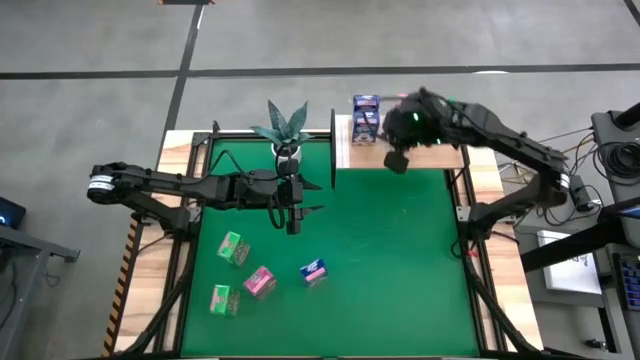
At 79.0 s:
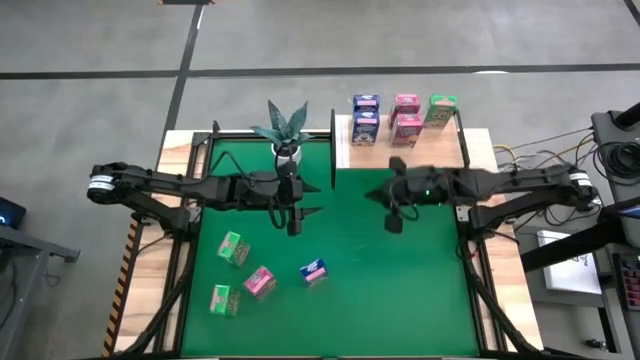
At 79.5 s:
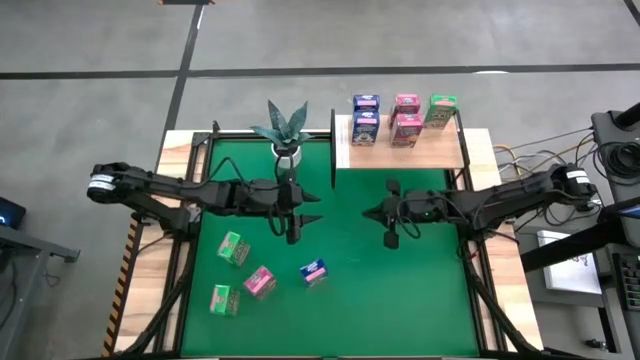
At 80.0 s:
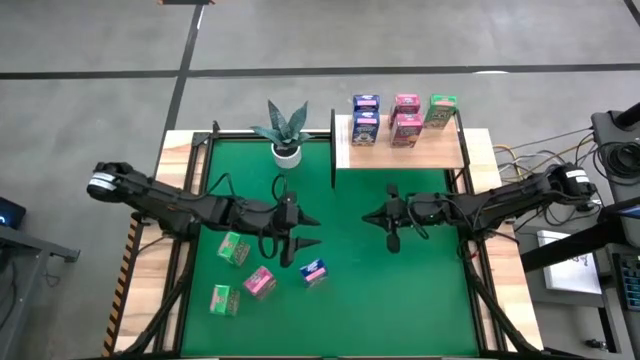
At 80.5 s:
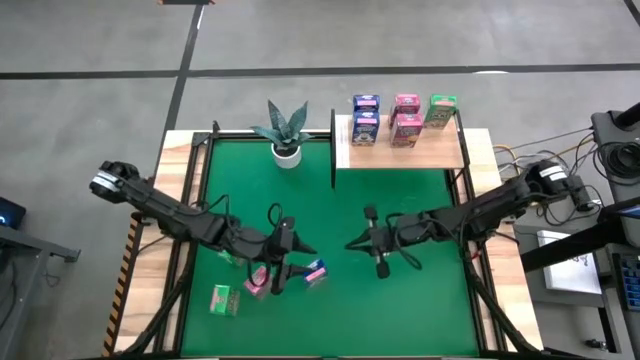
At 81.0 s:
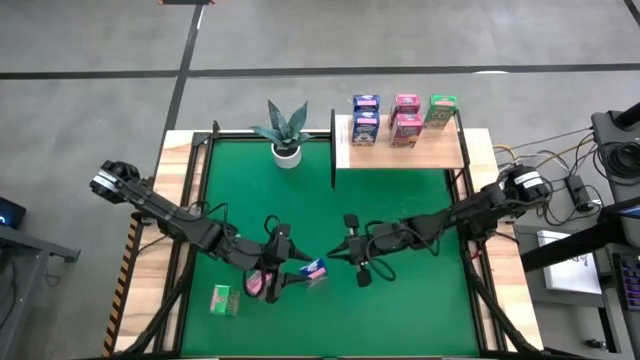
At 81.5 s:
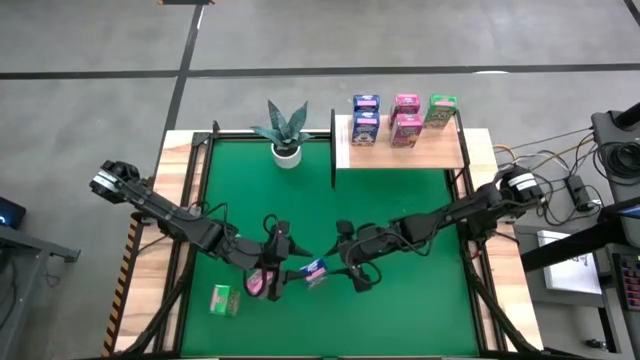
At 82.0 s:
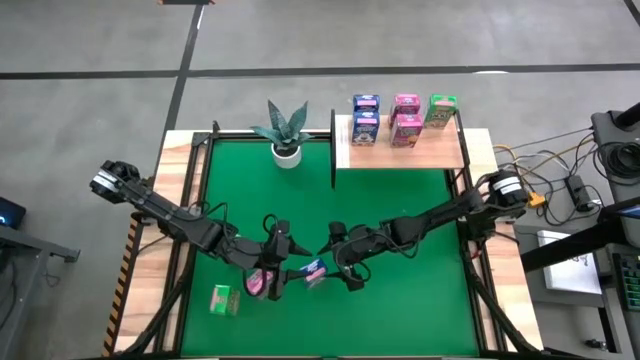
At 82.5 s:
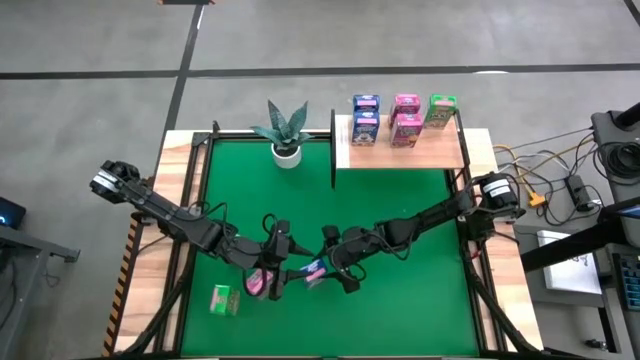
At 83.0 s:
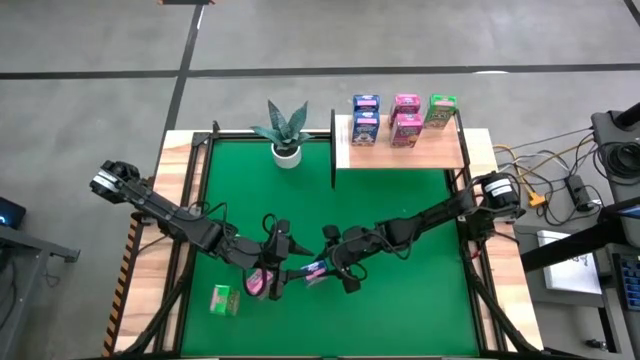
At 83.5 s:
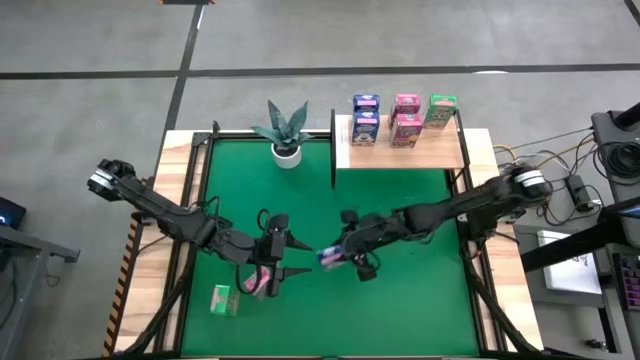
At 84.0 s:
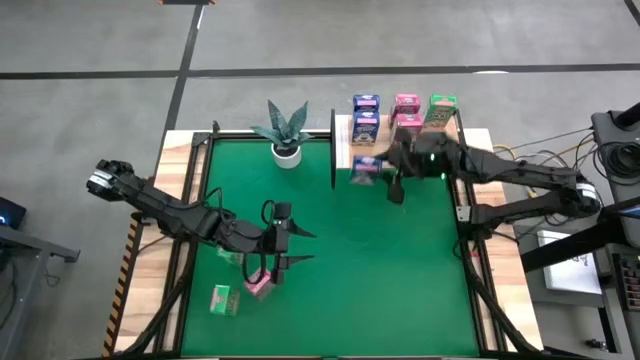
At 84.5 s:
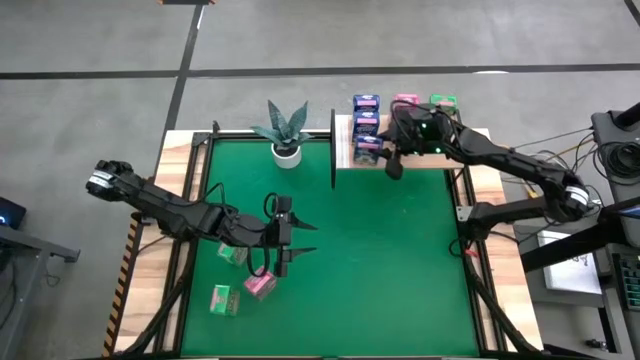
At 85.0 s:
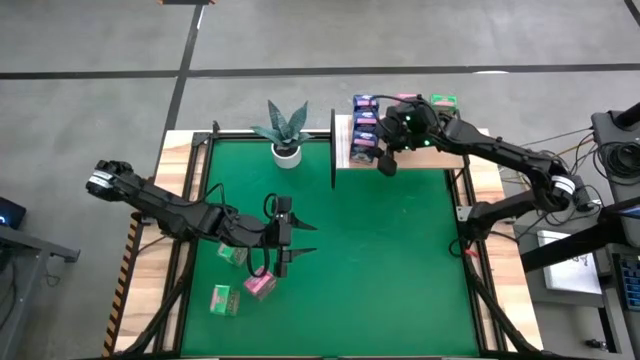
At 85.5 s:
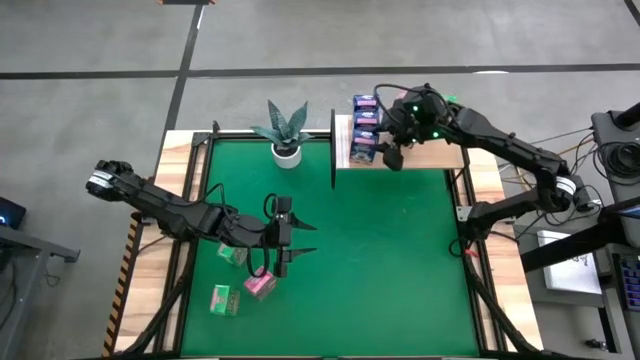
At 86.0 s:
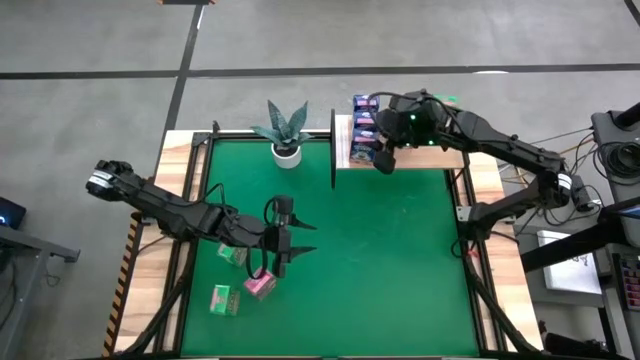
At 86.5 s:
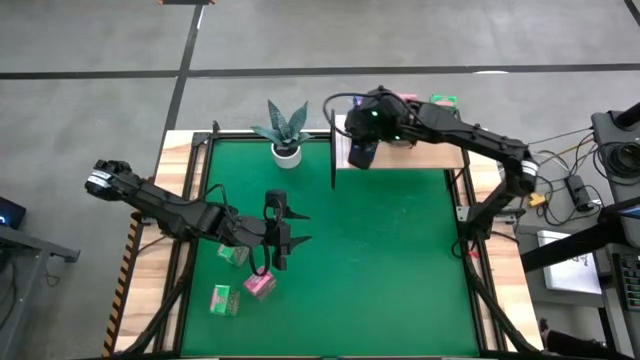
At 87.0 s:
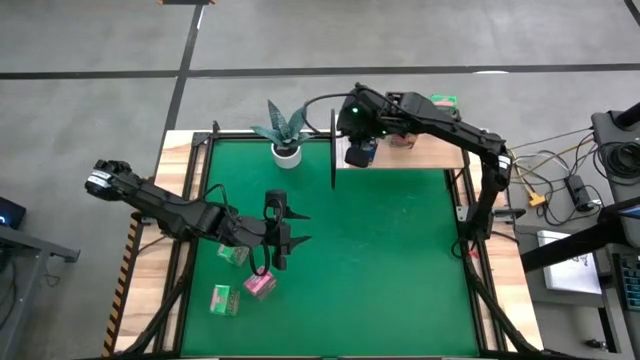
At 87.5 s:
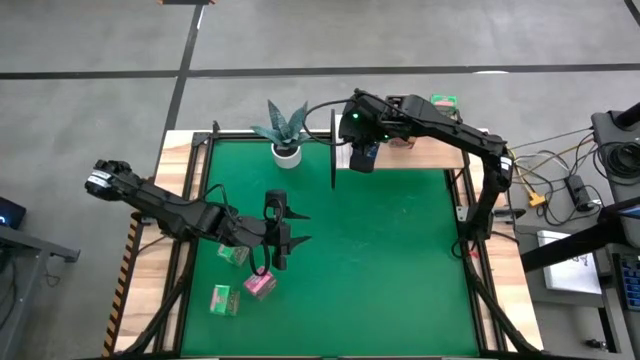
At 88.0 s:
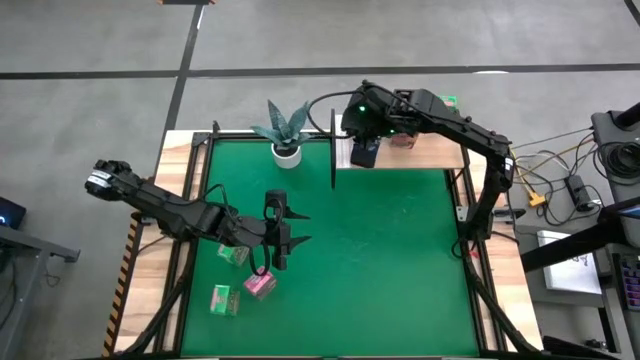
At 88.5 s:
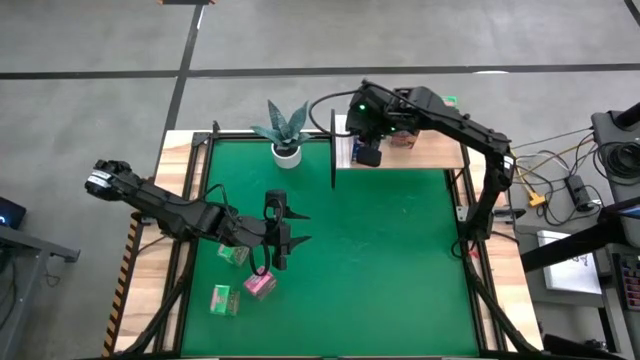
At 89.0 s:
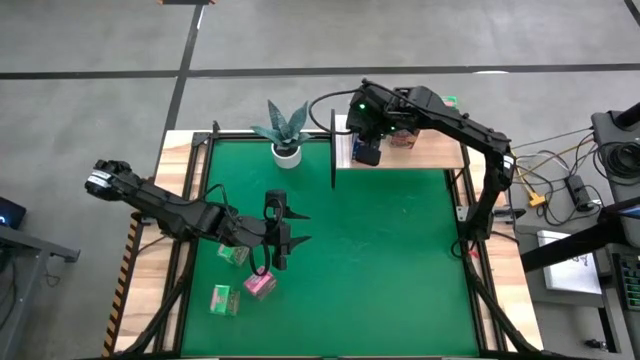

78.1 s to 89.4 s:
Task: Stack cereal on shelf
Put the blue cereal box on the shelf aligned with the other blue cereal boxes

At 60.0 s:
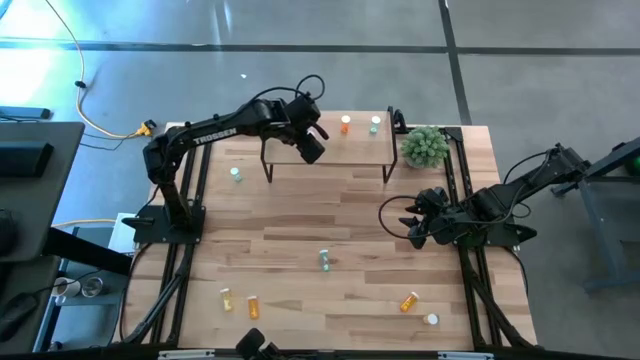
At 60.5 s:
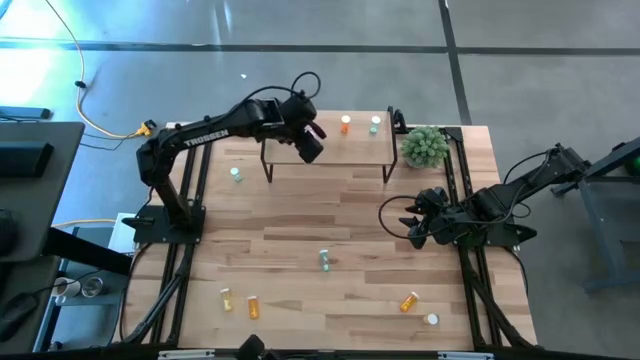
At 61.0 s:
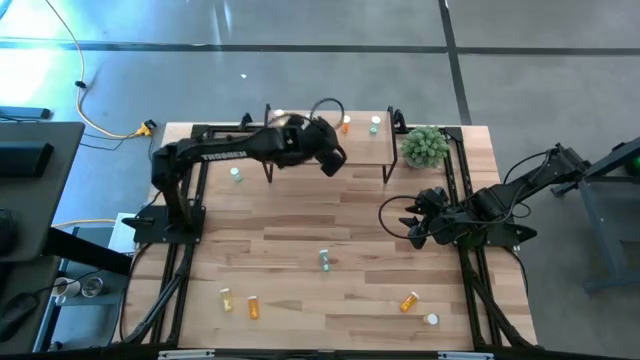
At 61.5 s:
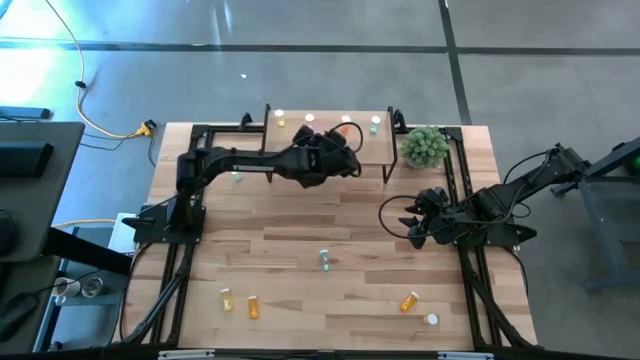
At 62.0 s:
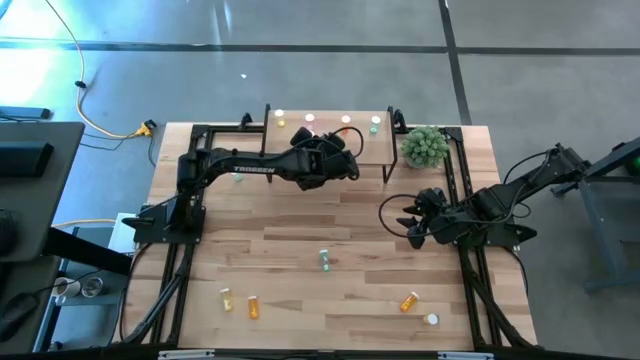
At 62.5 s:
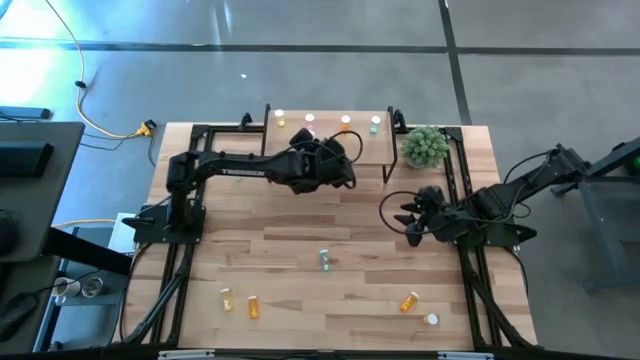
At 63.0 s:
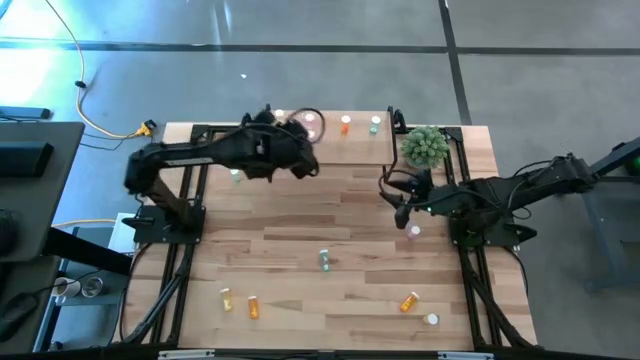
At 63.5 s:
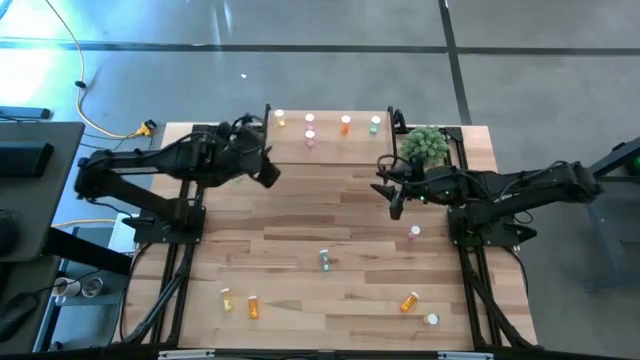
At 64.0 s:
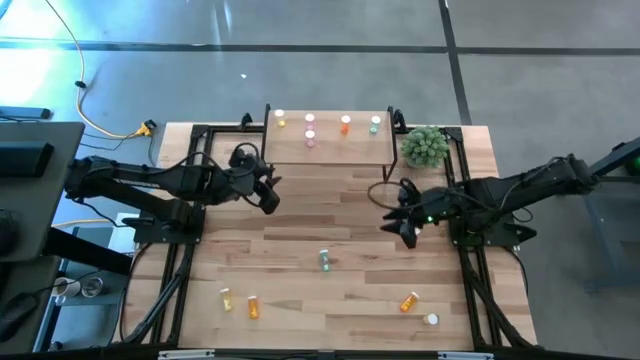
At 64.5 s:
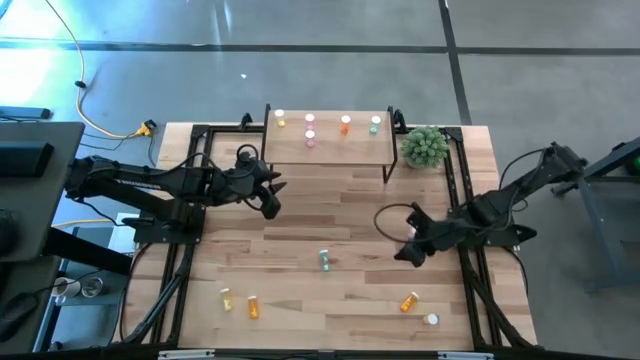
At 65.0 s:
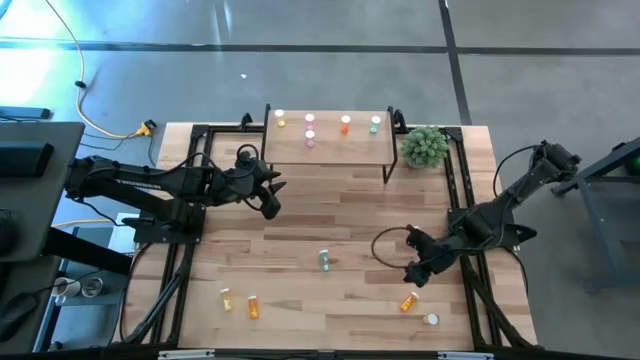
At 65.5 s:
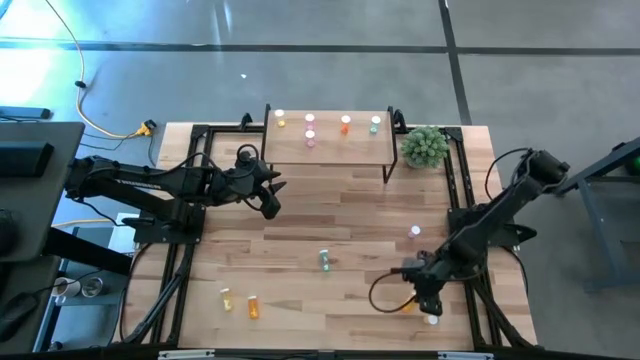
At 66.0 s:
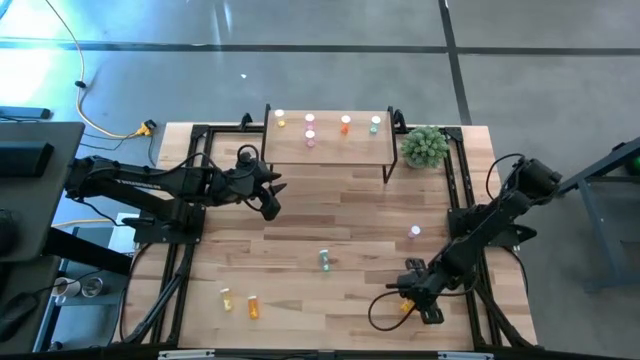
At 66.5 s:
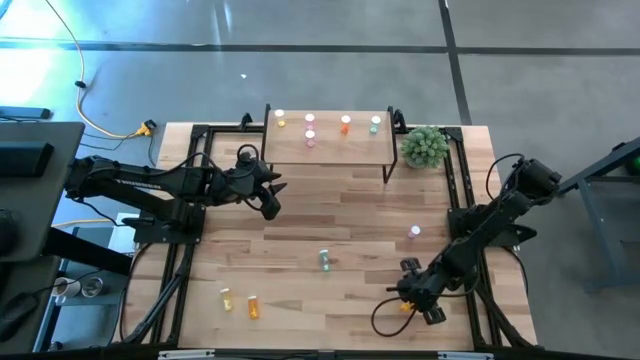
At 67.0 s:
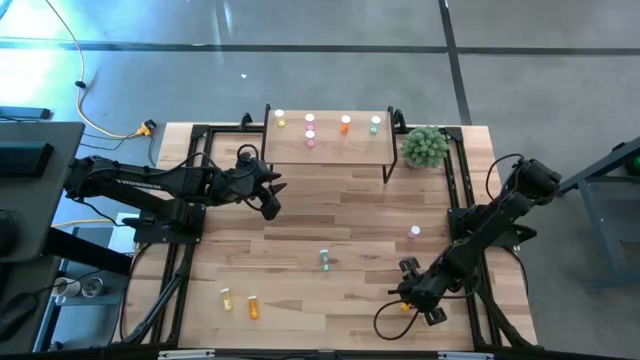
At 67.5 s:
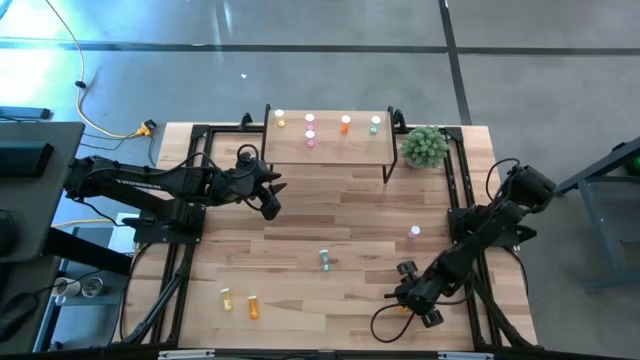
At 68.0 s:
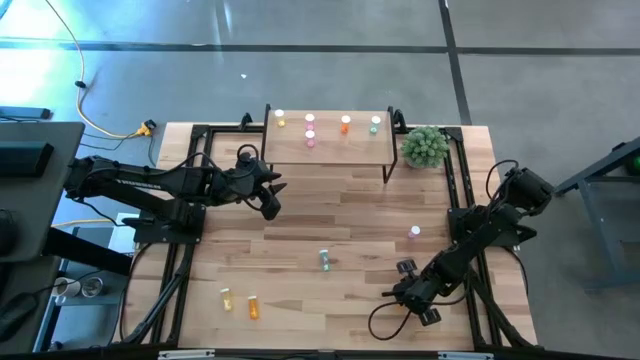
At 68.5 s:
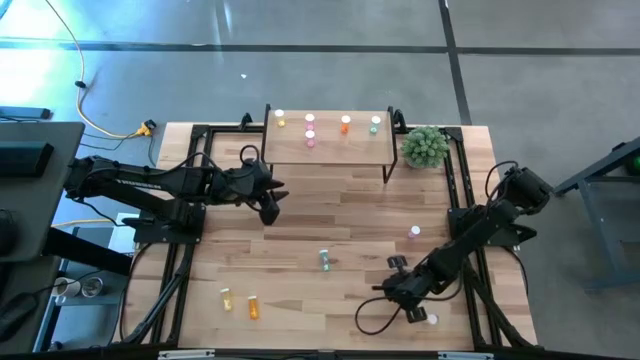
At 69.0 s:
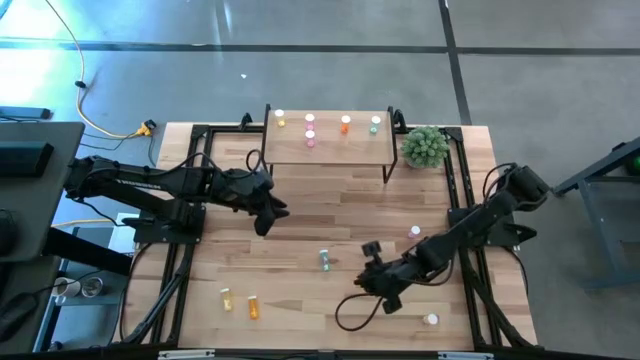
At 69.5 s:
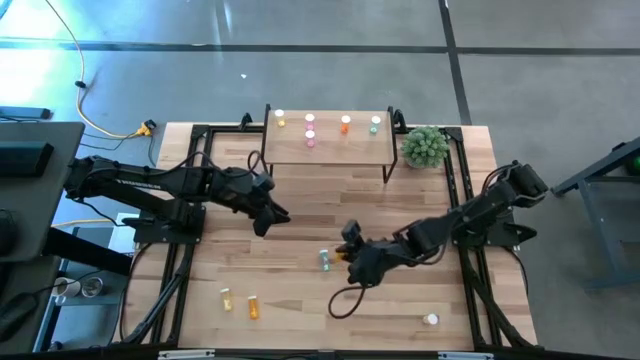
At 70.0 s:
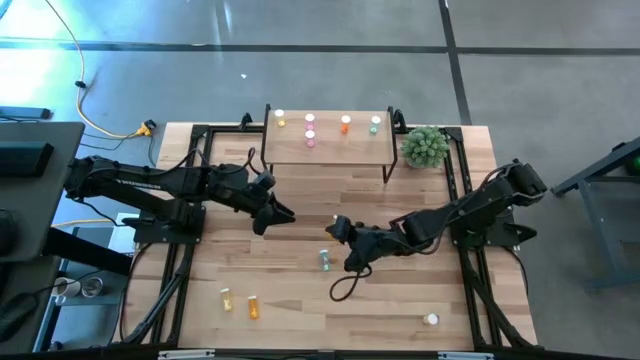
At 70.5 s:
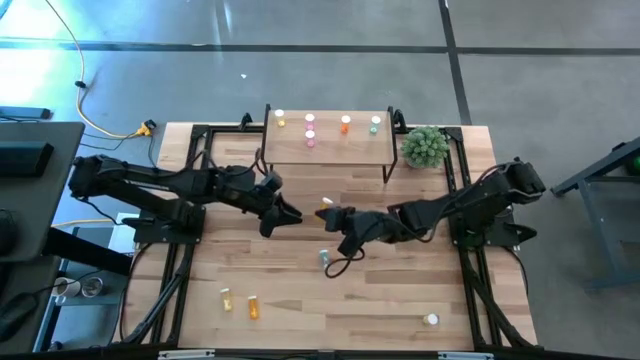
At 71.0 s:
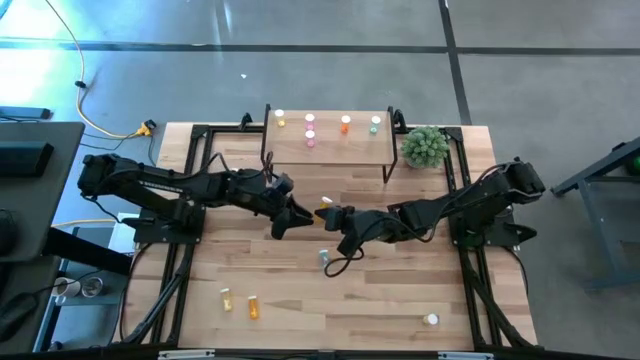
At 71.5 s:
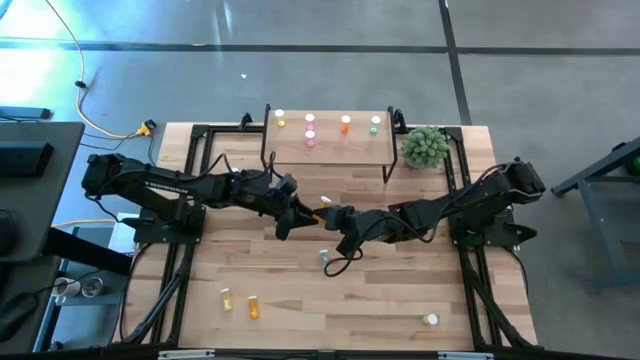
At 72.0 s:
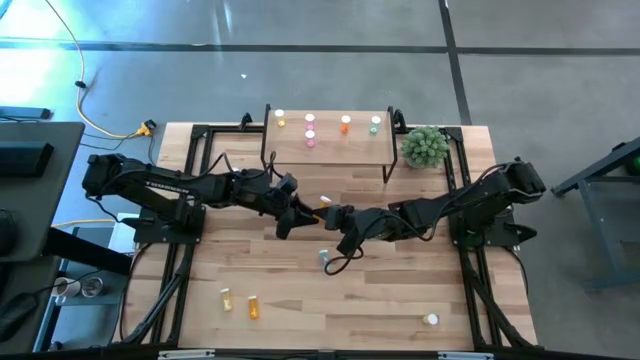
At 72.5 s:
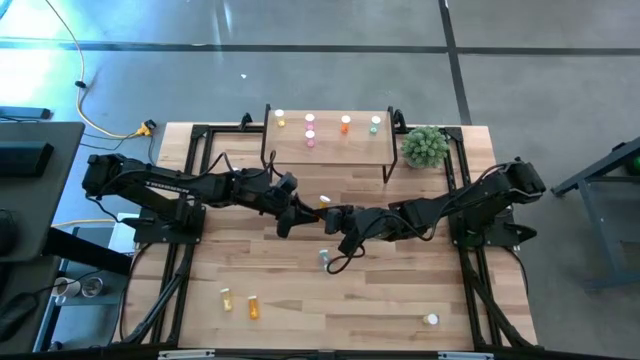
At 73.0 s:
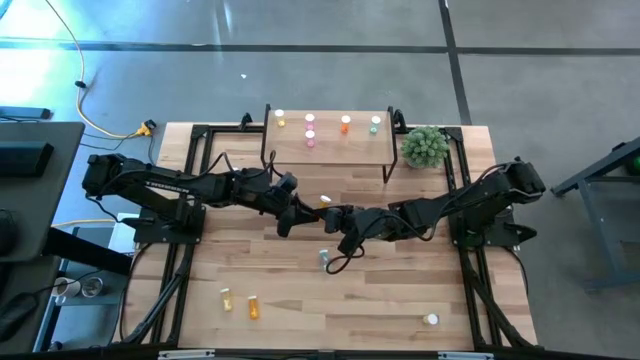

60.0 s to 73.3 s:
Task: Pick and place medicine bottles onto shelf by color
Put the right orange pill bottle on the shelf aligned with the other orange pill bottle
